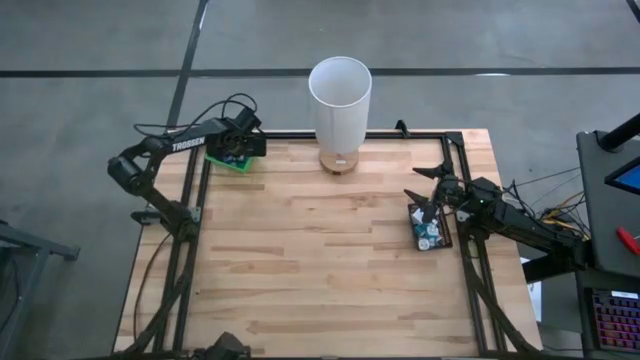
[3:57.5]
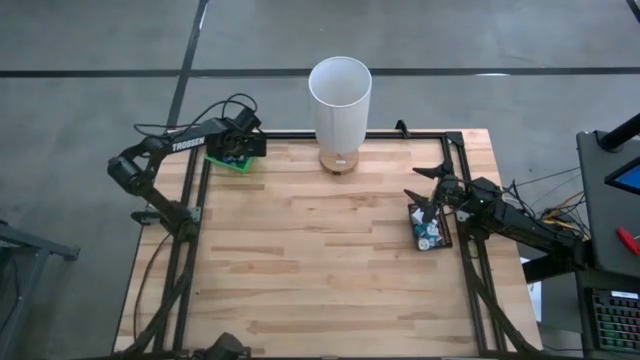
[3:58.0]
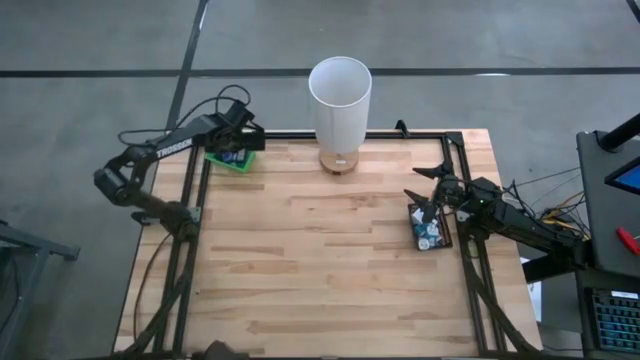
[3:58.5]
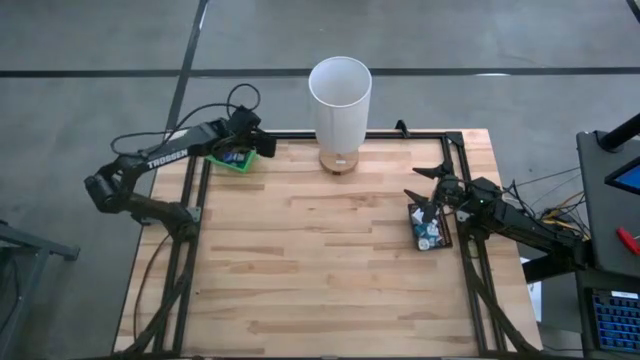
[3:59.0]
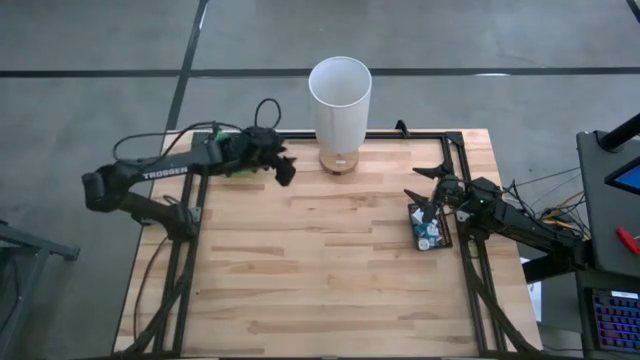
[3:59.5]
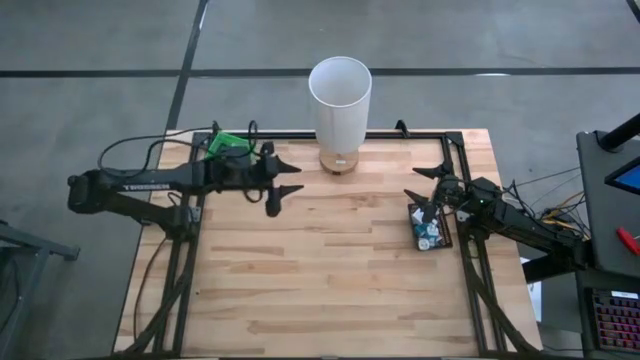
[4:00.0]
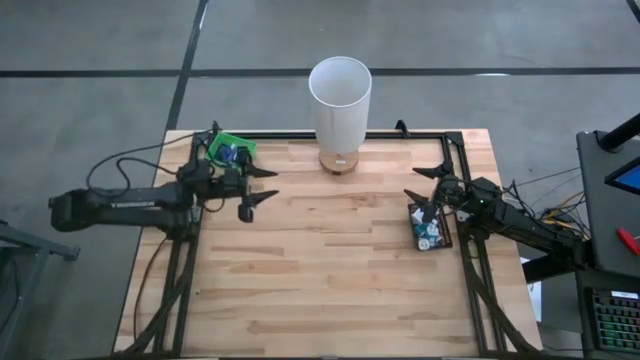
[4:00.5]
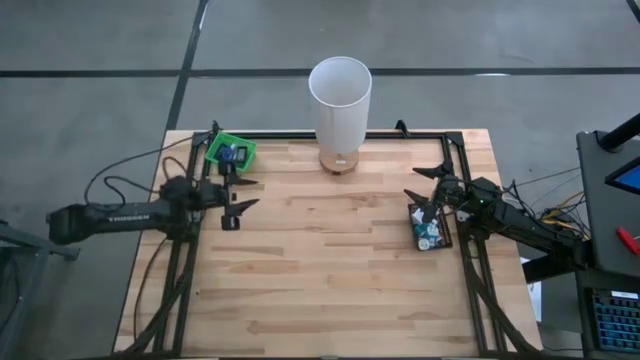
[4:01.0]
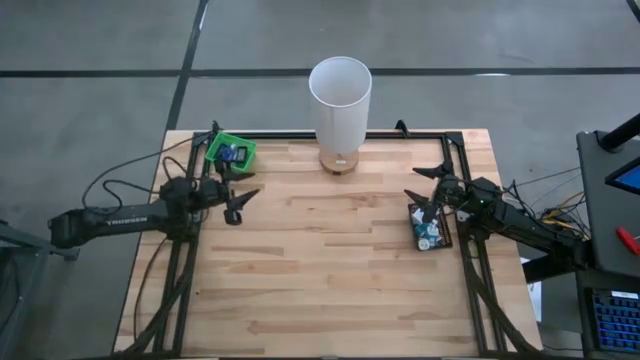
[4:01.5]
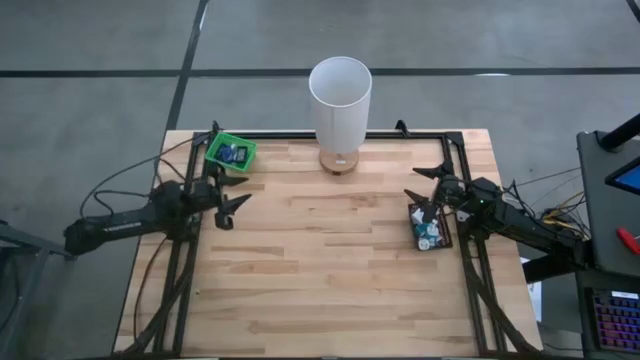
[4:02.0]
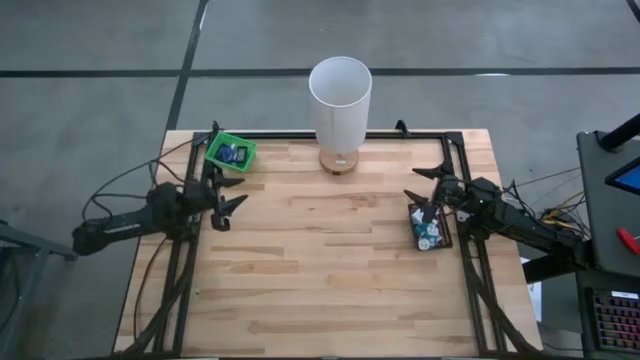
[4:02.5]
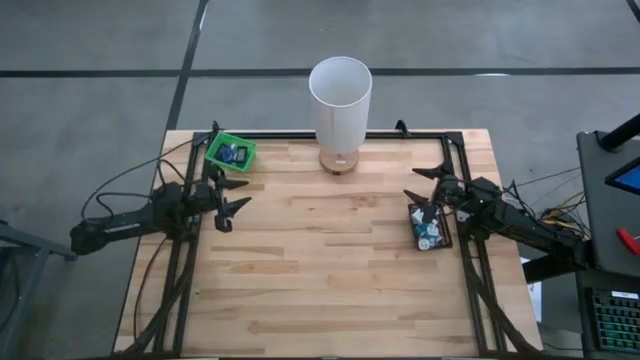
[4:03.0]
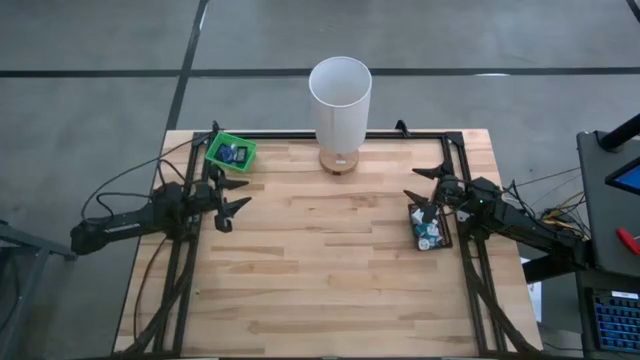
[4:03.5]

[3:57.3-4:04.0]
Task: Pick & Place Office items
Return to Home Position

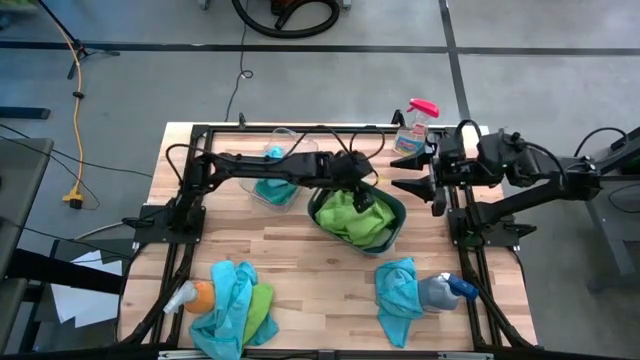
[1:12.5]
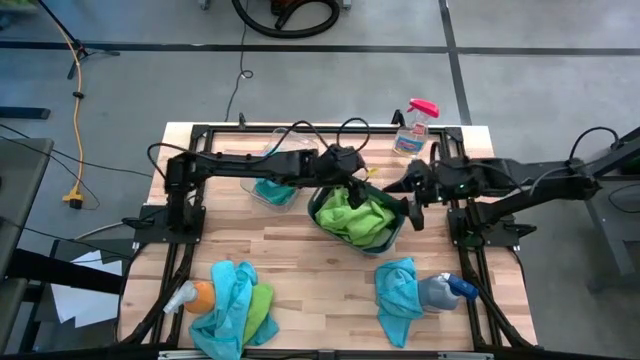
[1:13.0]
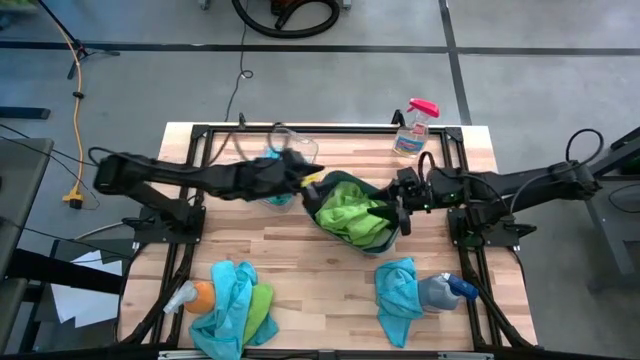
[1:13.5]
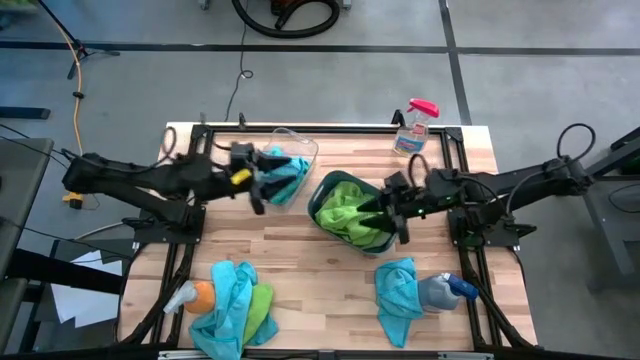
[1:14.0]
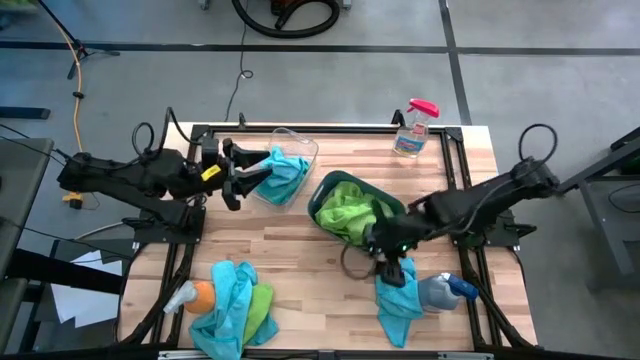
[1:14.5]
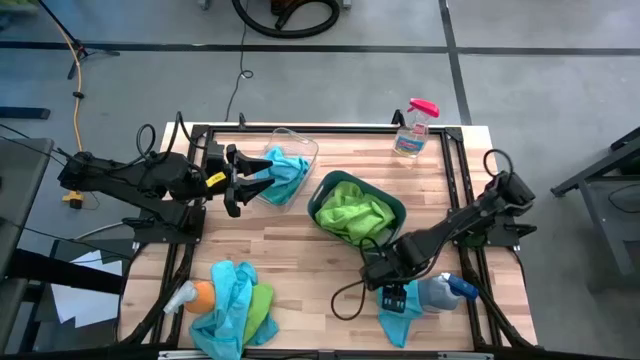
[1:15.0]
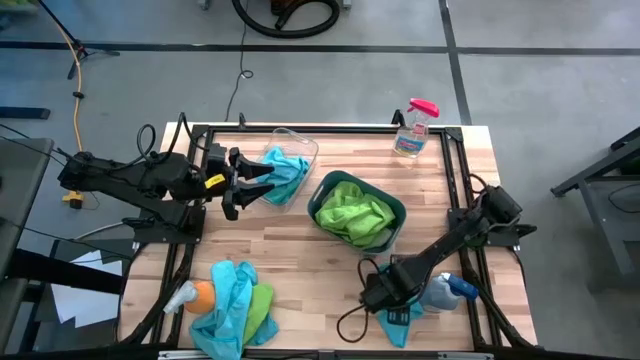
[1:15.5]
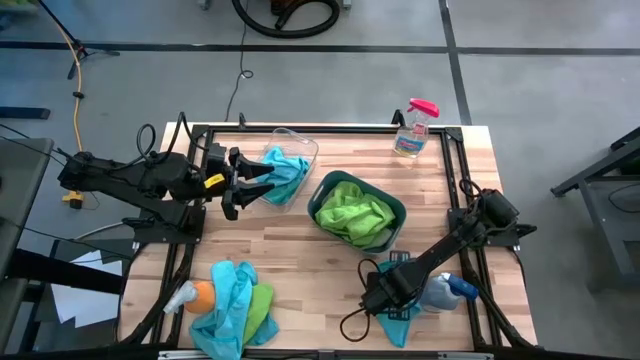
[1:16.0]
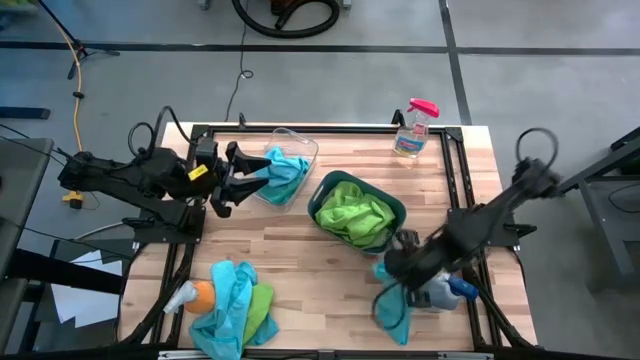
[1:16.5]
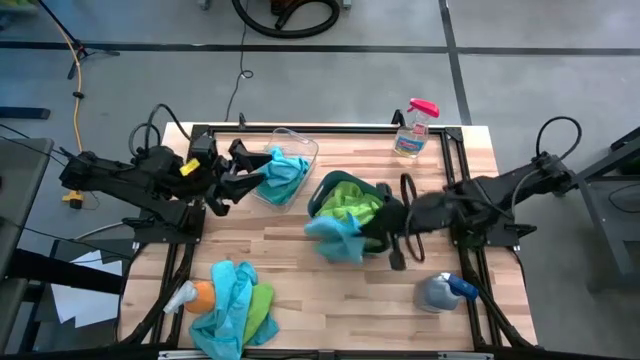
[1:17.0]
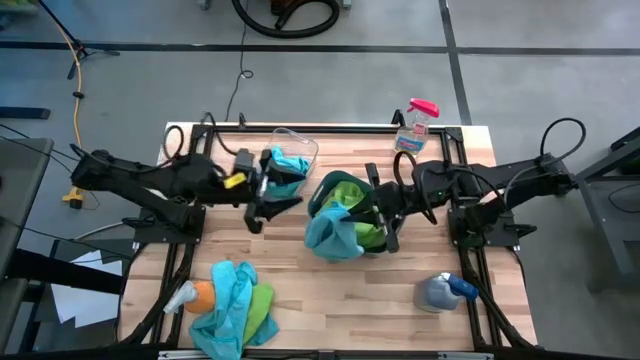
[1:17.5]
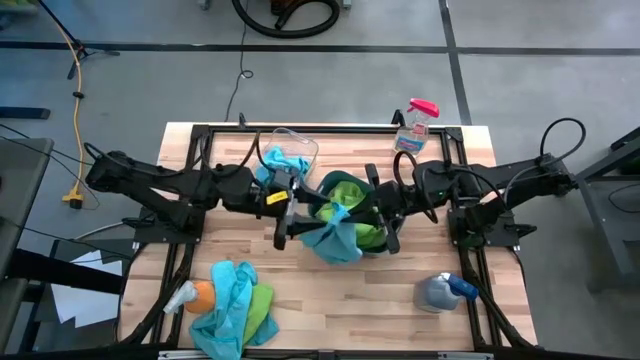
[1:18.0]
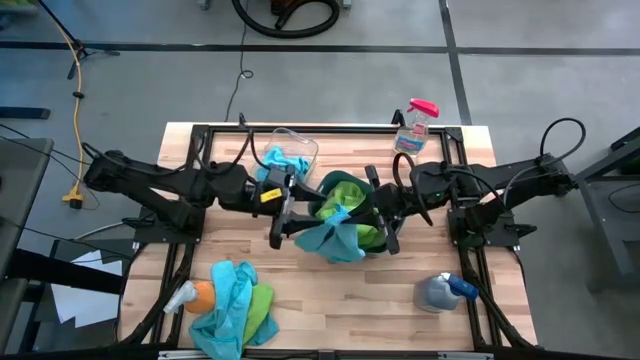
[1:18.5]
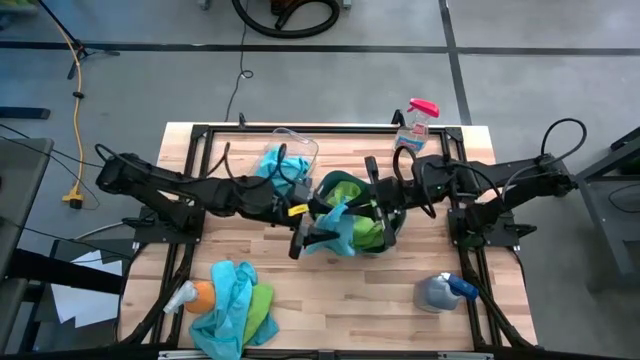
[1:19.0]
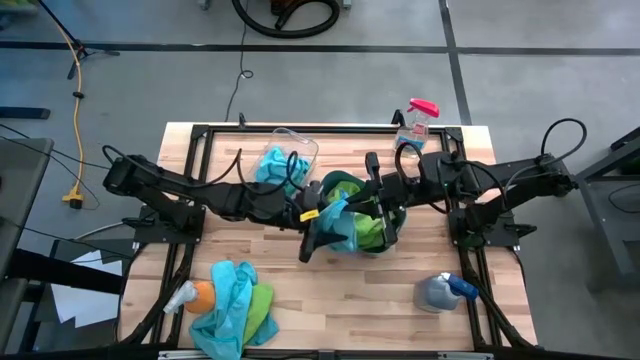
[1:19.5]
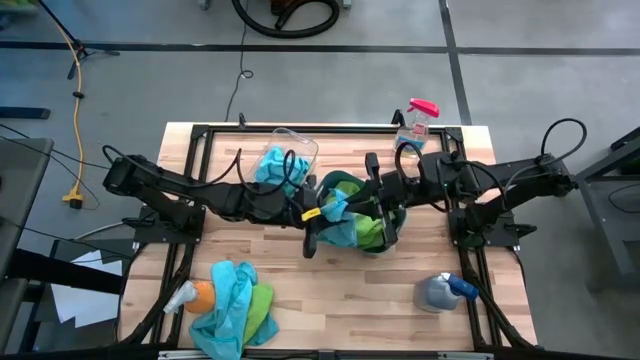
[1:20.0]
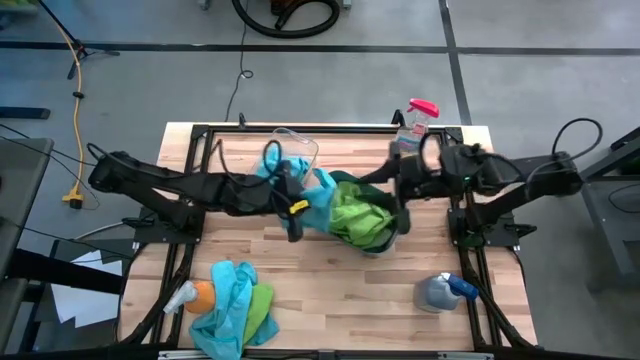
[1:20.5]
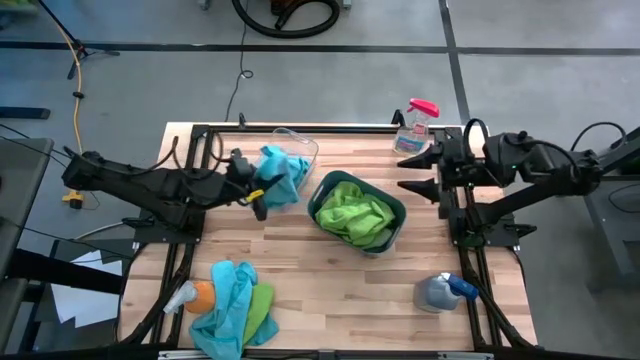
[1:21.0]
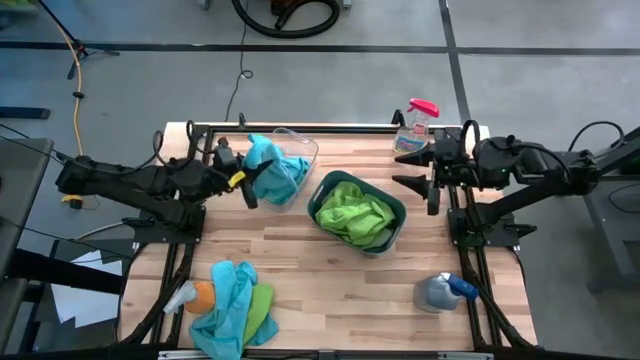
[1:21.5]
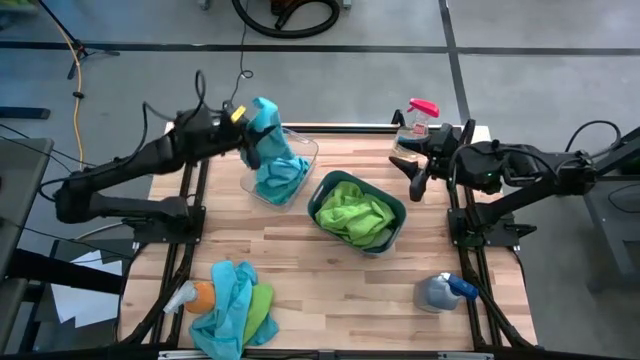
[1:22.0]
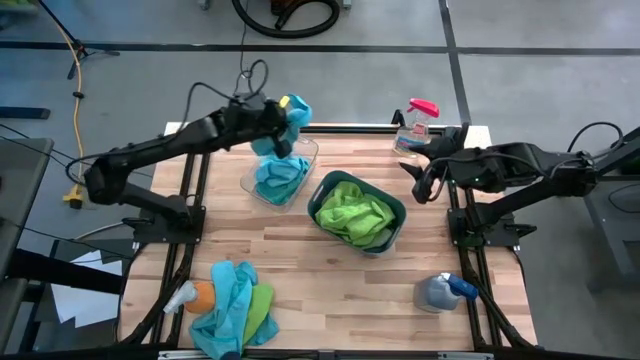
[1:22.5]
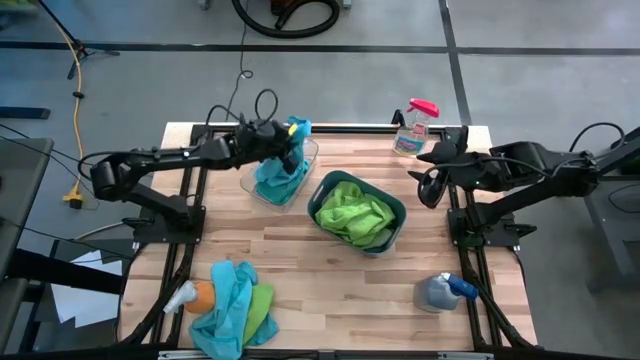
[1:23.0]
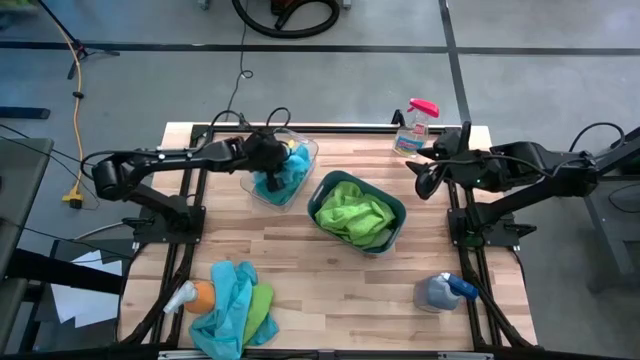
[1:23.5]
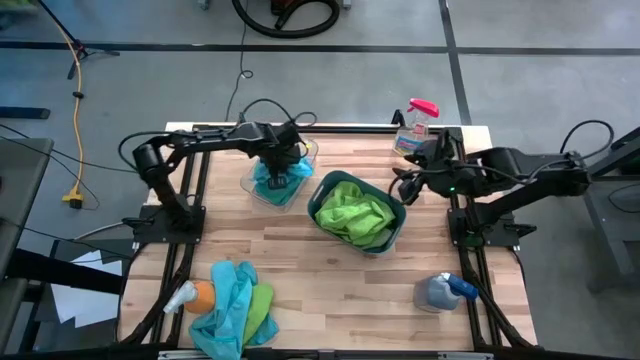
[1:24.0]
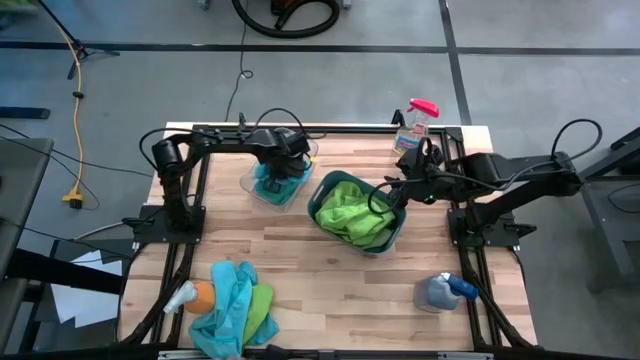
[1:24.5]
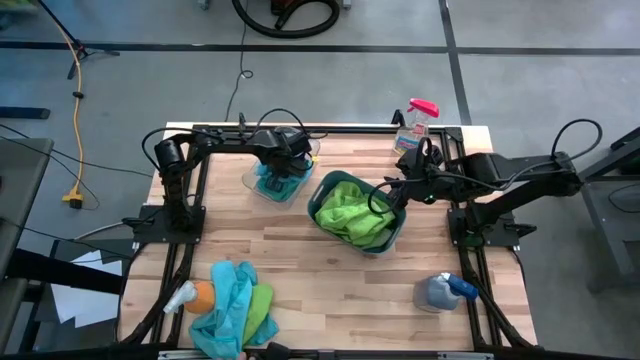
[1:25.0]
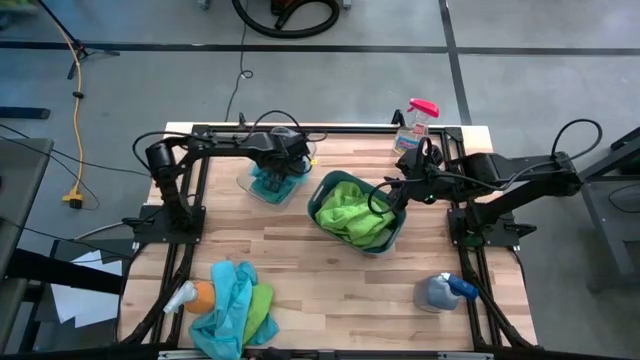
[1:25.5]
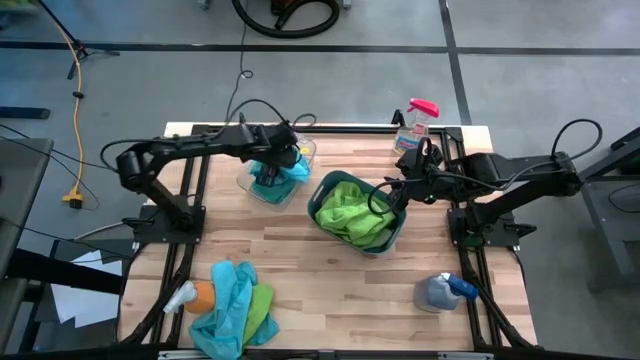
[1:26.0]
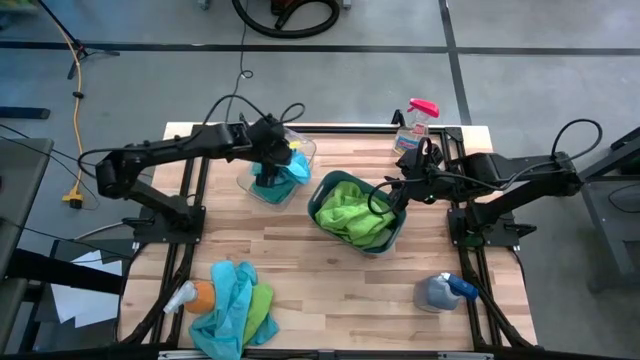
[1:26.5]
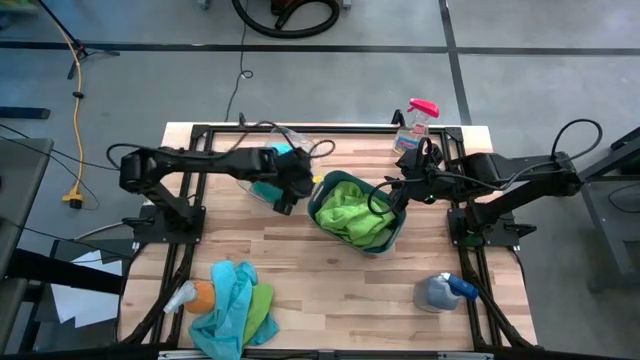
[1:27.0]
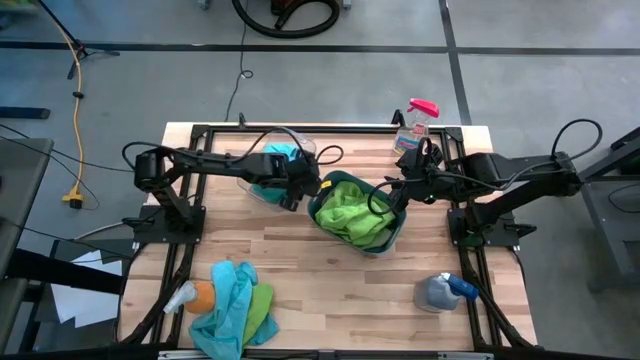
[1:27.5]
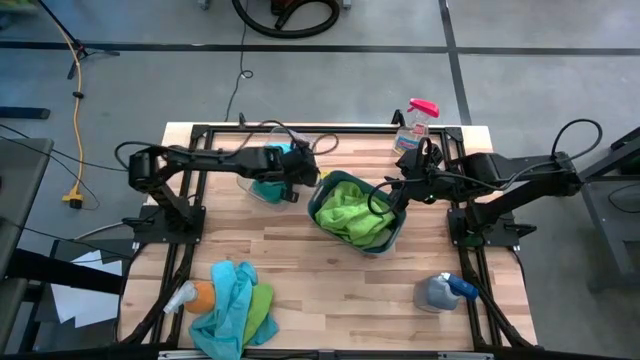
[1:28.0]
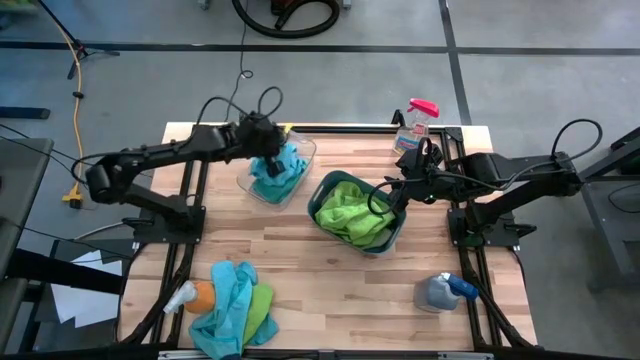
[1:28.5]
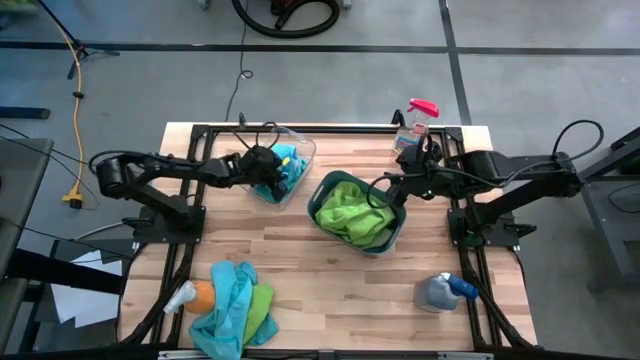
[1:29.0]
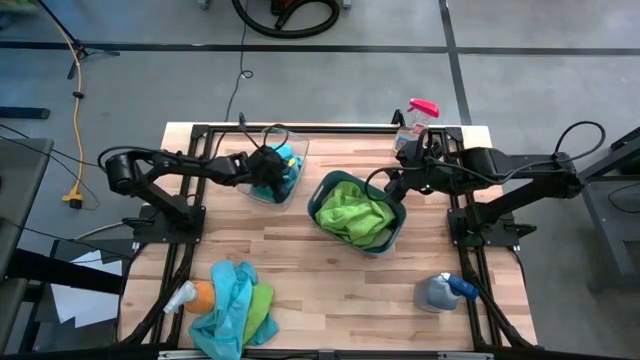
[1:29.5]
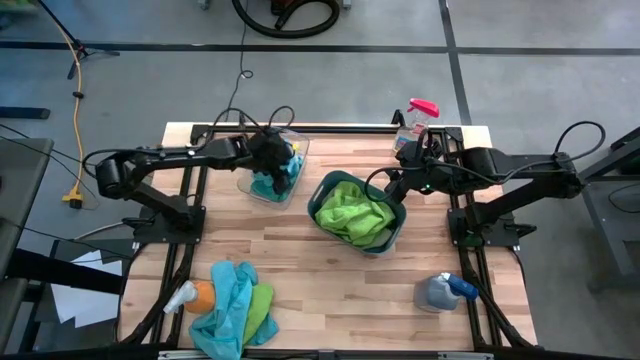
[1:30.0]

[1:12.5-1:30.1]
Task: Sort microfiber towel by color & place in baskets
Put the blue microfiber towel into the transparent bin
